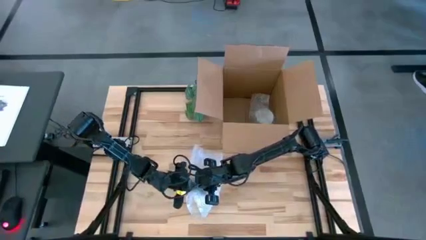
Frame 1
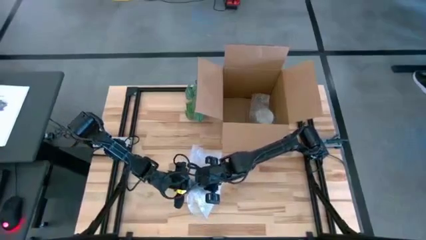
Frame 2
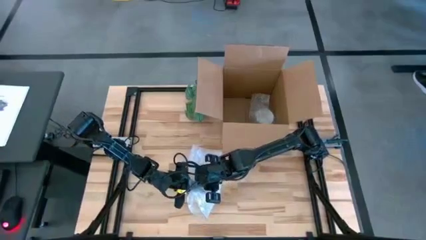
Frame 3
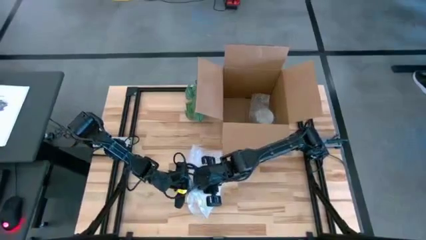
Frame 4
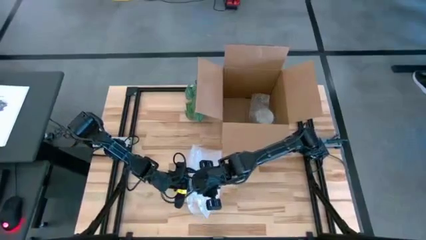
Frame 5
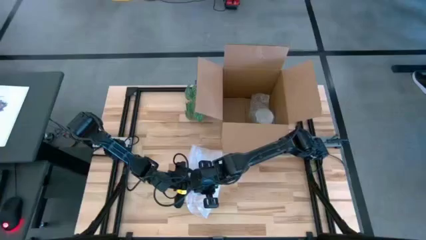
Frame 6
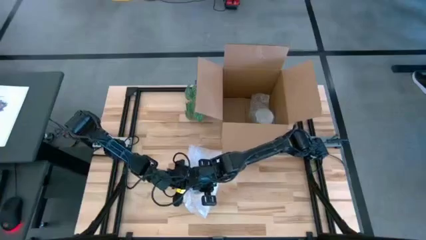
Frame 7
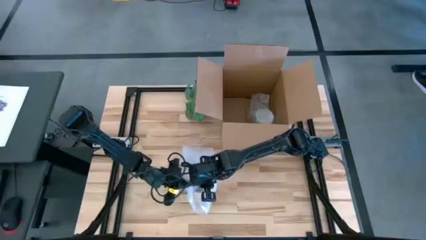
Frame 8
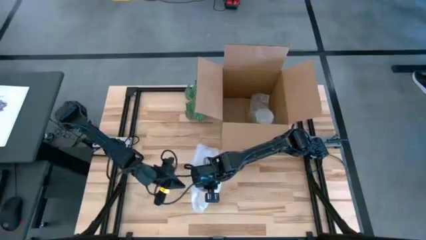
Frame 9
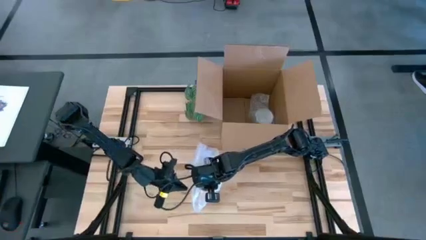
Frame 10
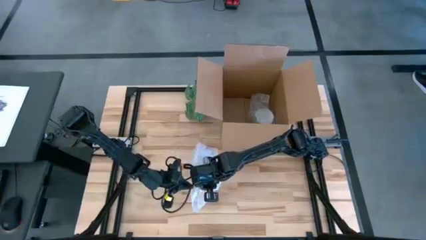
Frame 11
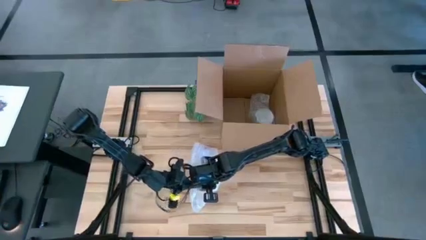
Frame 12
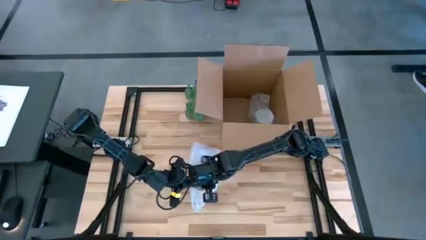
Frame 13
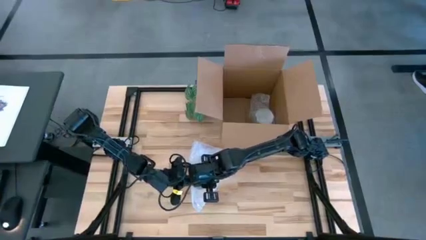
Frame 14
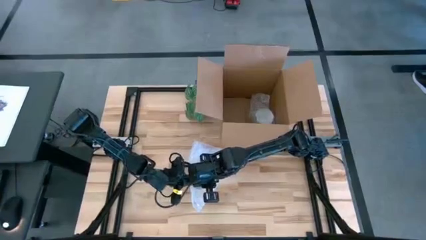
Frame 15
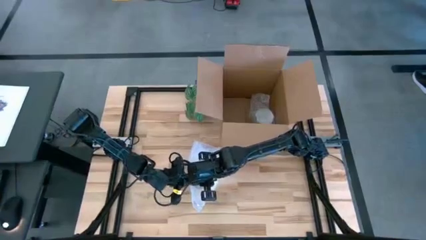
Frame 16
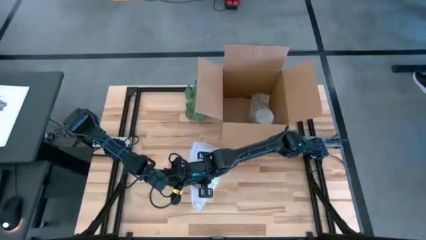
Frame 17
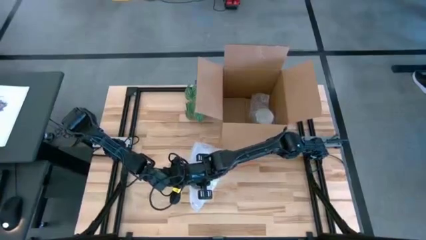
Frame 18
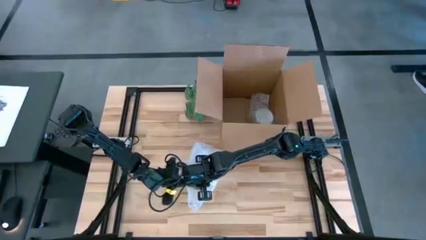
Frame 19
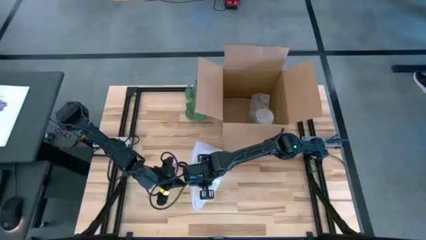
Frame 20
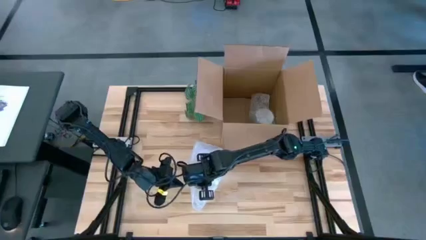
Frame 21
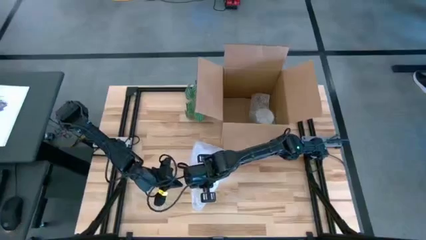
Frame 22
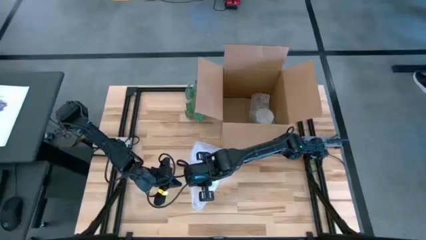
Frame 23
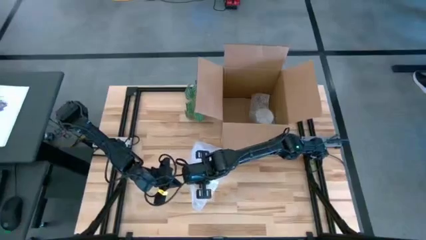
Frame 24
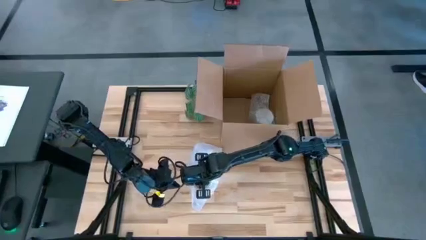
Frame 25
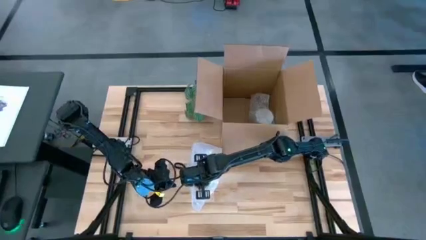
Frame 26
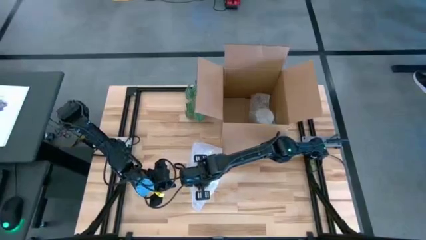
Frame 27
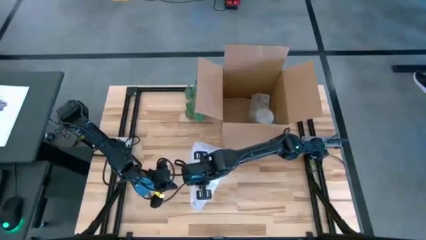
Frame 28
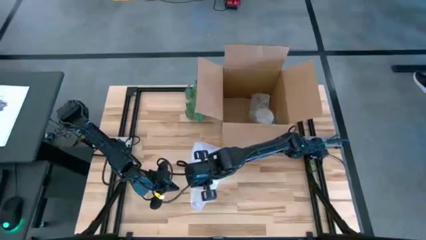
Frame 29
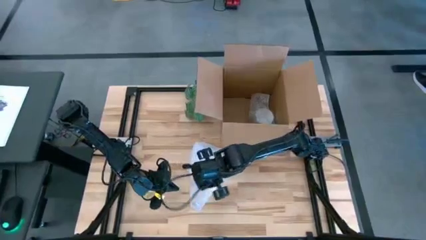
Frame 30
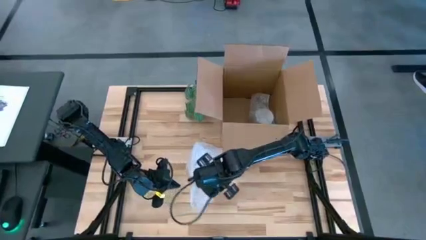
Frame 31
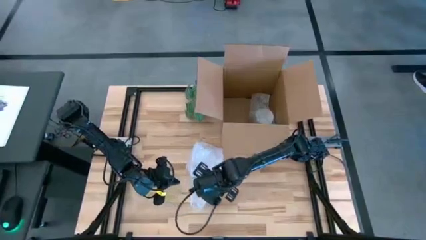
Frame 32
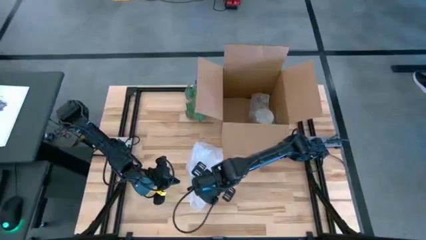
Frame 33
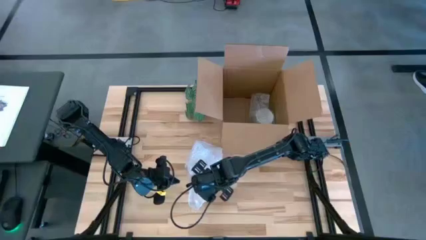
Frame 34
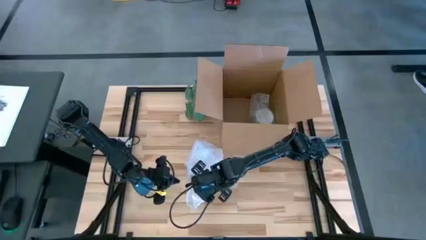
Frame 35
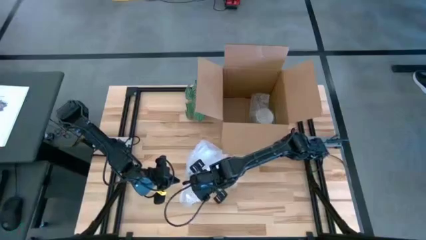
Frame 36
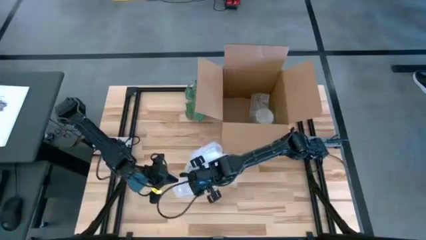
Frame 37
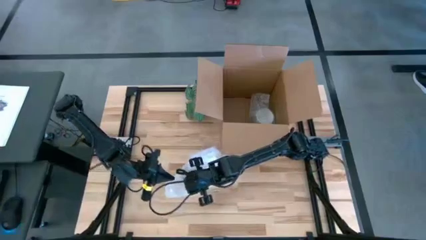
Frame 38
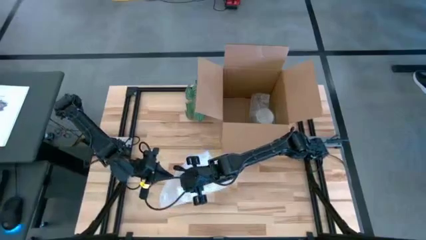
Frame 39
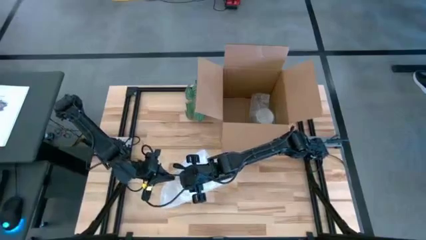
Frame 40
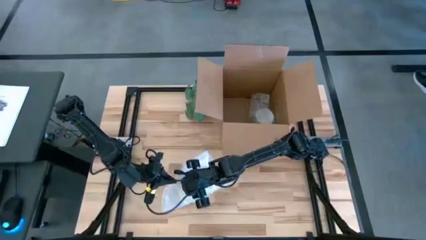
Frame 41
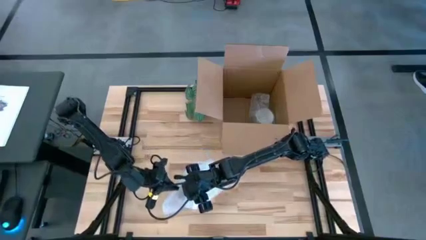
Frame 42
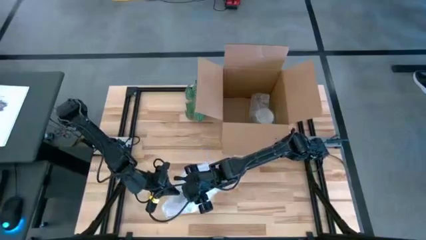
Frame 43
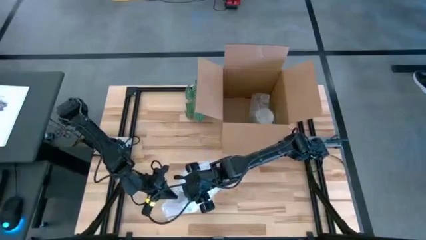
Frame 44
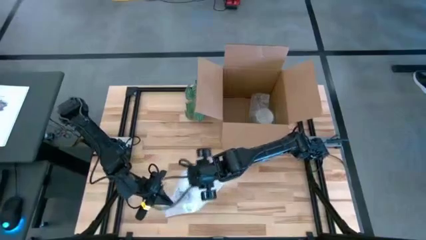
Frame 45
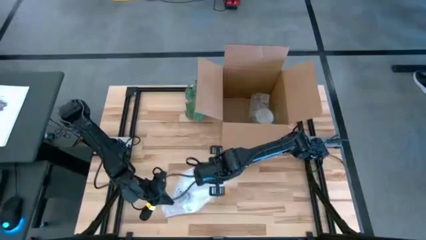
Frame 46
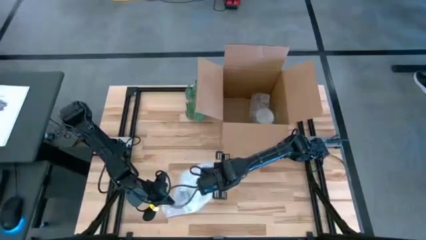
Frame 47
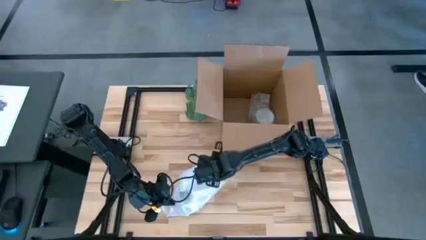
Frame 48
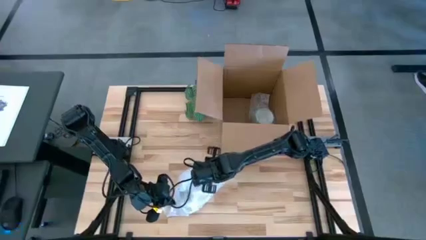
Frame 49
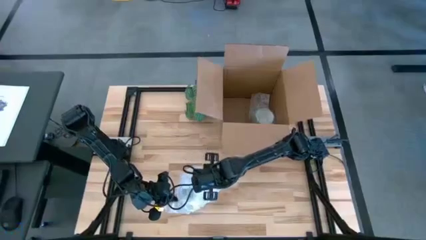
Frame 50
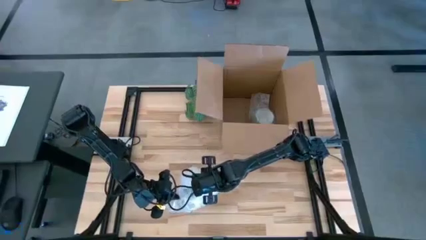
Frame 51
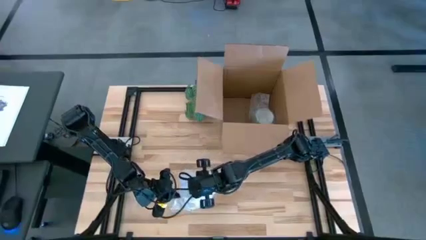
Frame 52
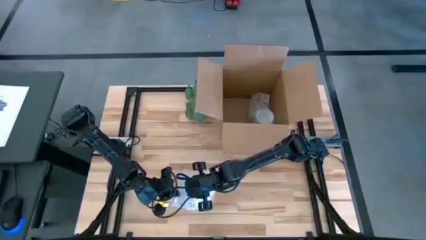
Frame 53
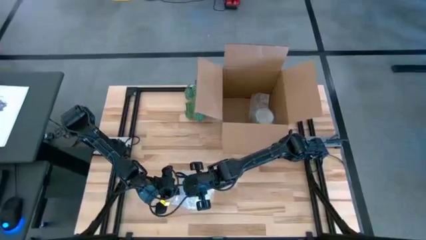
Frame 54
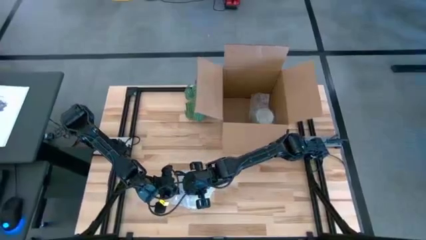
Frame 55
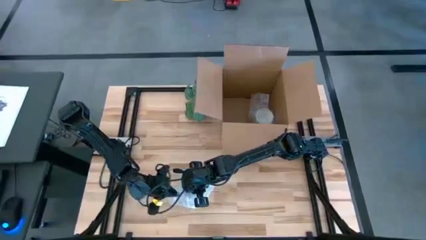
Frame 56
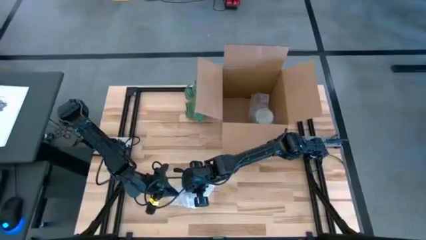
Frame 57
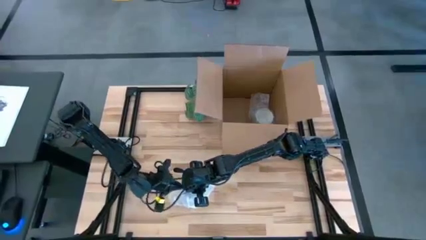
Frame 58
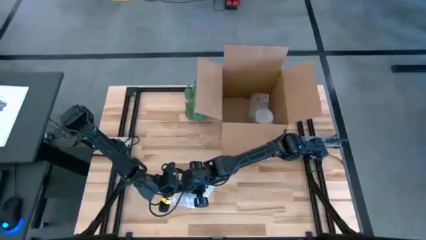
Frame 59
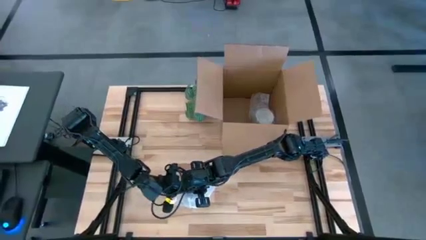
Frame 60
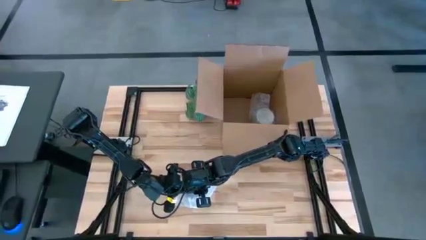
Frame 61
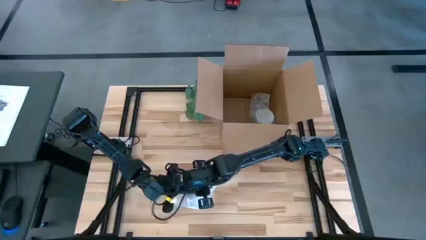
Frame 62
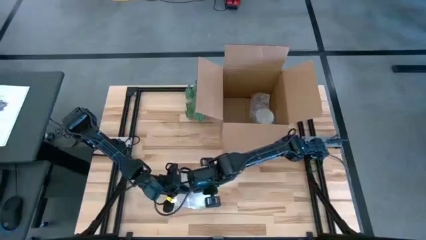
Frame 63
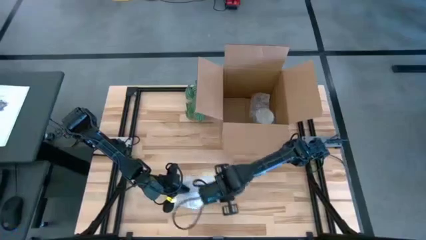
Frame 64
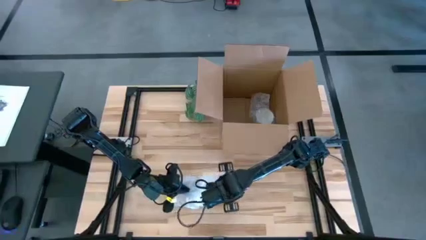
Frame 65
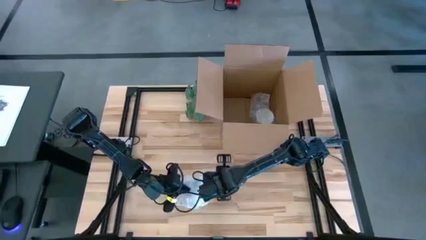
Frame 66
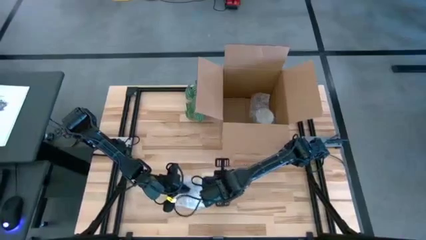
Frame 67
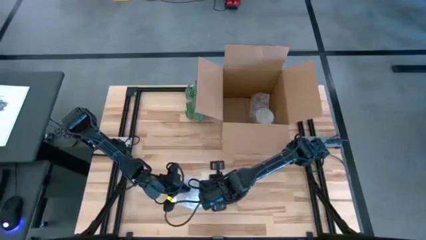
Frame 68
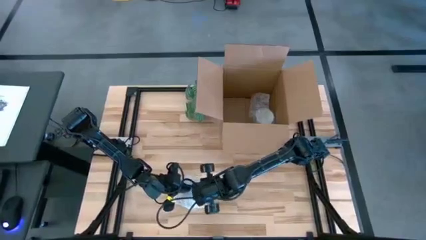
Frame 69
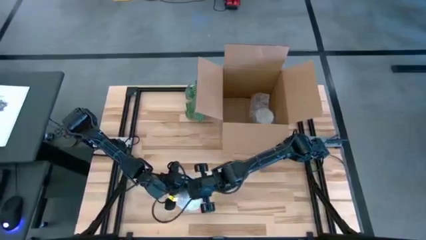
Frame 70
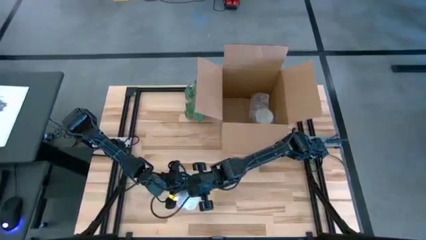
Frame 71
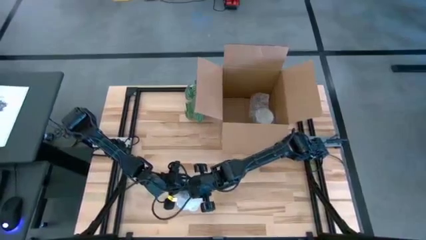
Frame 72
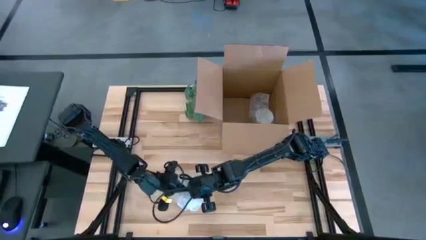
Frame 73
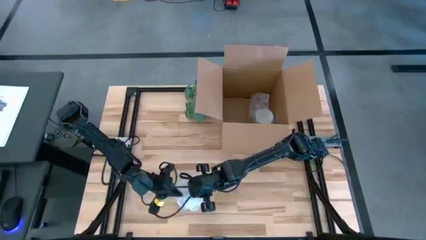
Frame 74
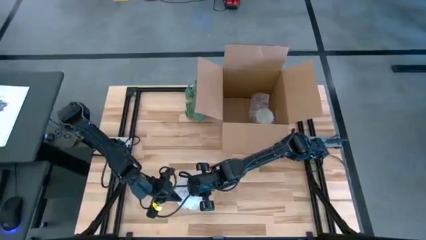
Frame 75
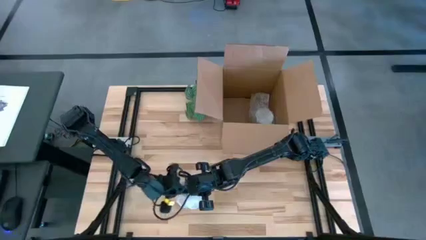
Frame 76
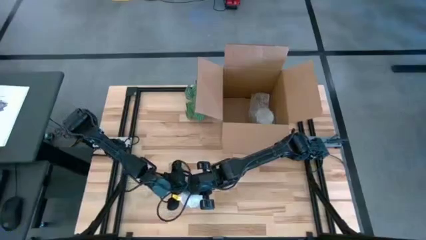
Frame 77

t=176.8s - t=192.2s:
Task: wrap mug
Wrap the orange cup with the bubble wrap

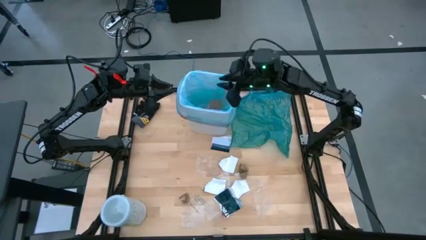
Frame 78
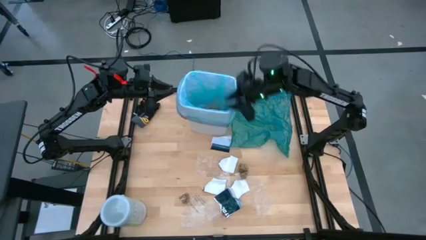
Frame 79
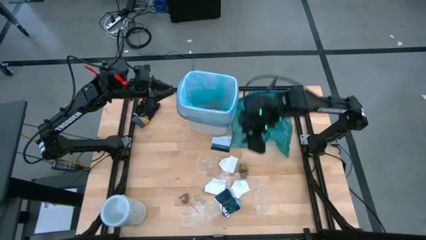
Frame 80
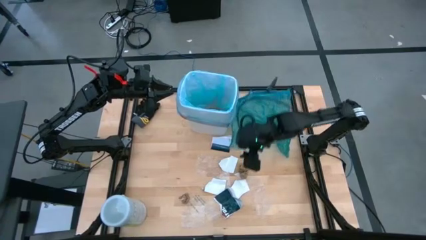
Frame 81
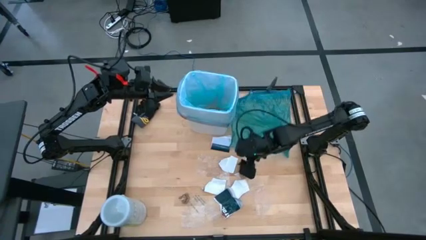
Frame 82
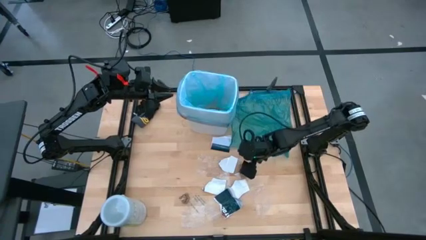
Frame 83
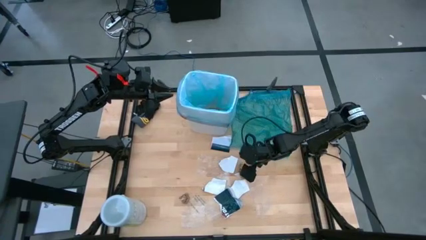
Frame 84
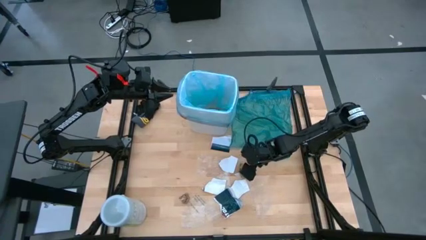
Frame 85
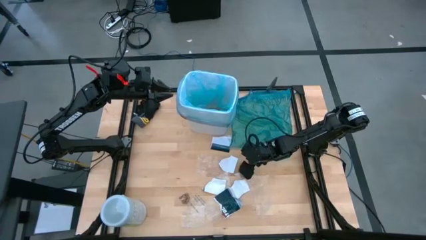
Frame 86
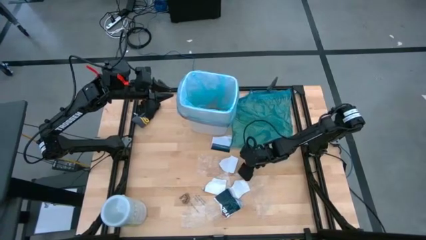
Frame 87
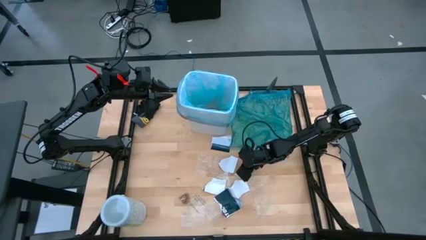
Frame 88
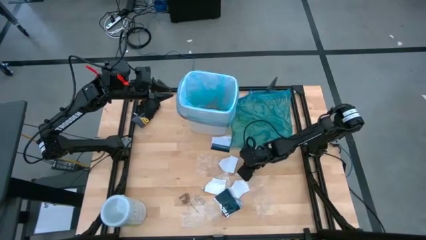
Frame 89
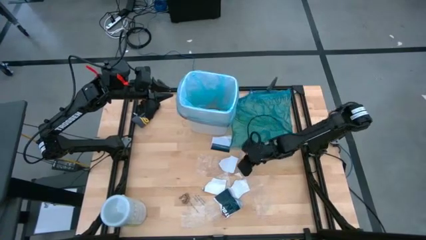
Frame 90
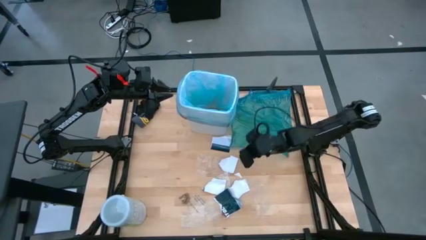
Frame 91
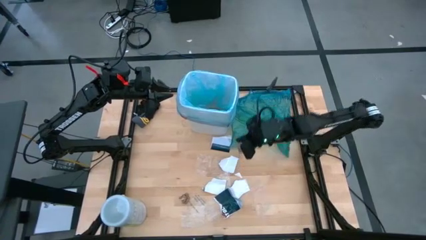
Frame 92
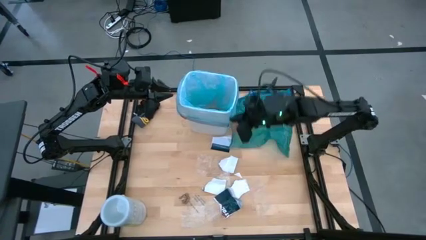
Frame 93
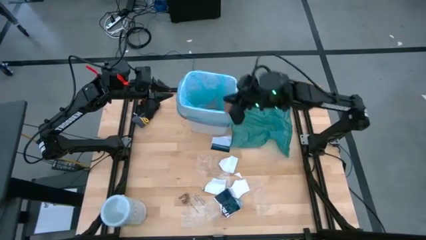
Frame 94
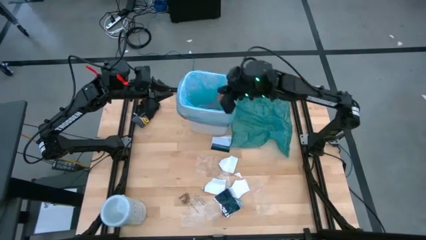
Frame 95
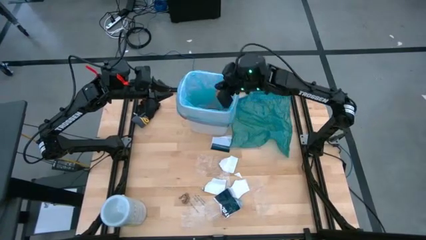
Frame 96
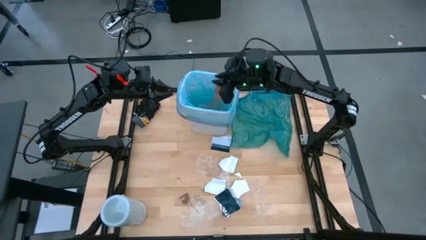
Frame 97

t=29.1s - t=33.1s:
Task: place trash/remove bag and relplace
Put the brown paper into the trash bin
